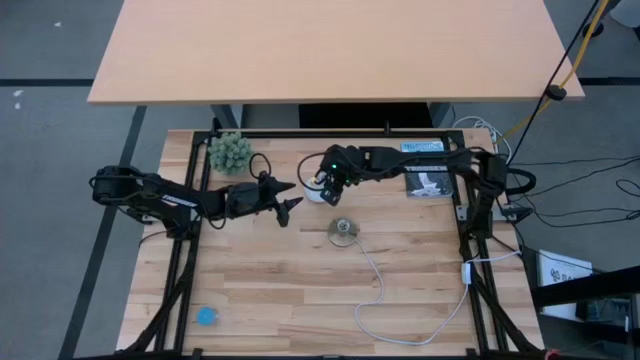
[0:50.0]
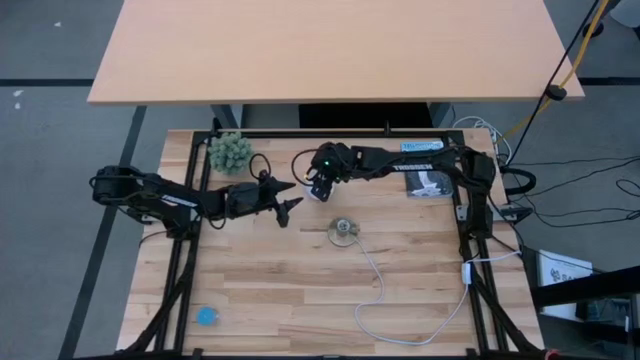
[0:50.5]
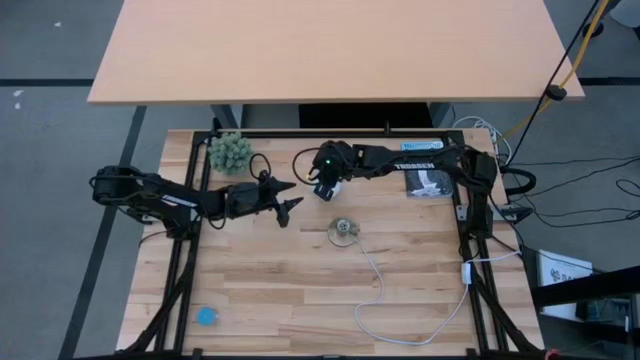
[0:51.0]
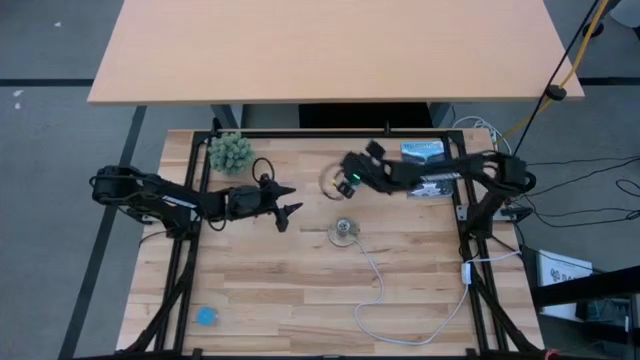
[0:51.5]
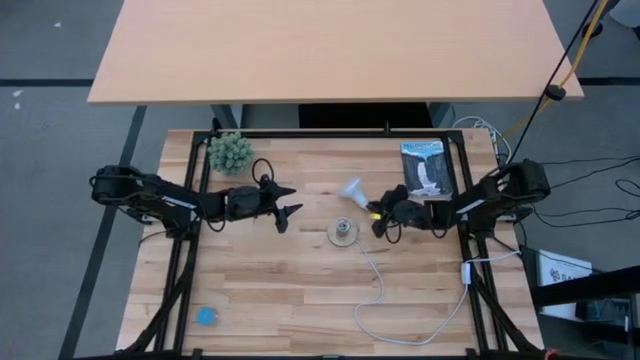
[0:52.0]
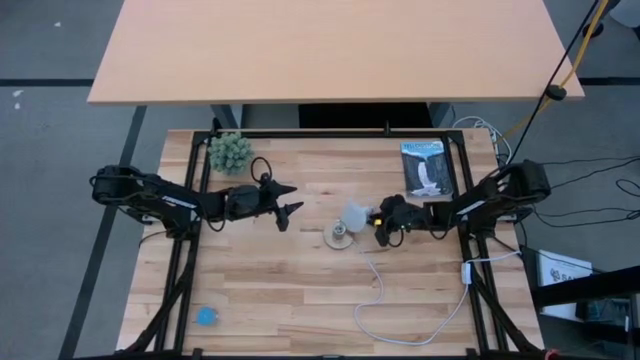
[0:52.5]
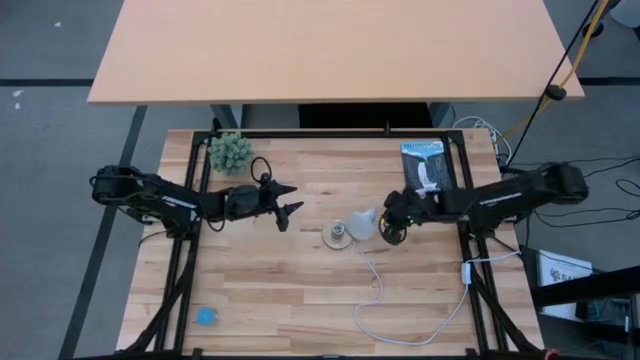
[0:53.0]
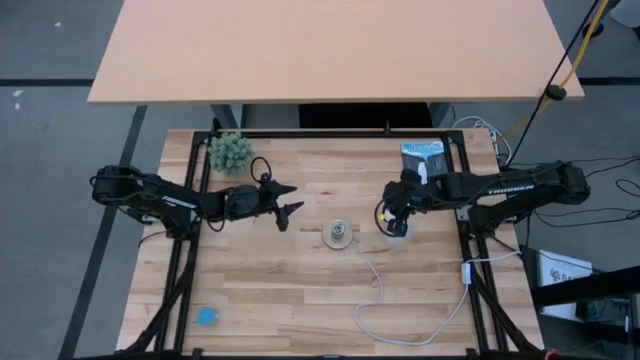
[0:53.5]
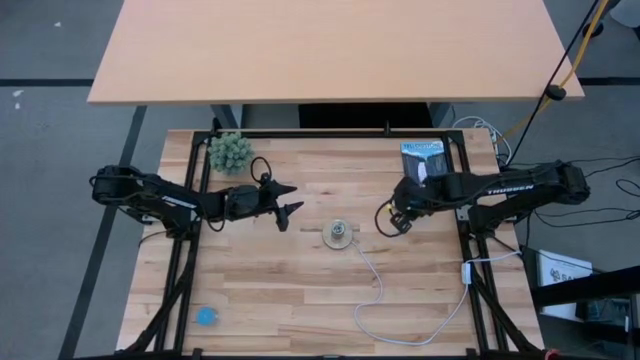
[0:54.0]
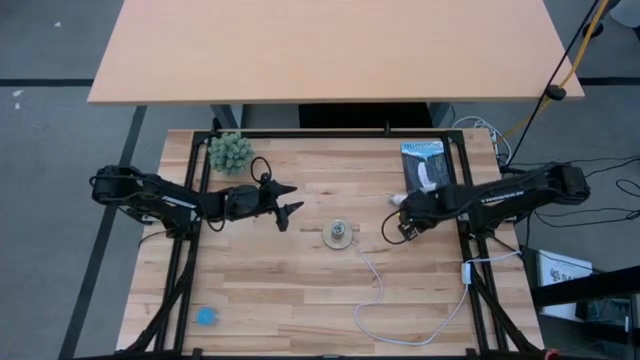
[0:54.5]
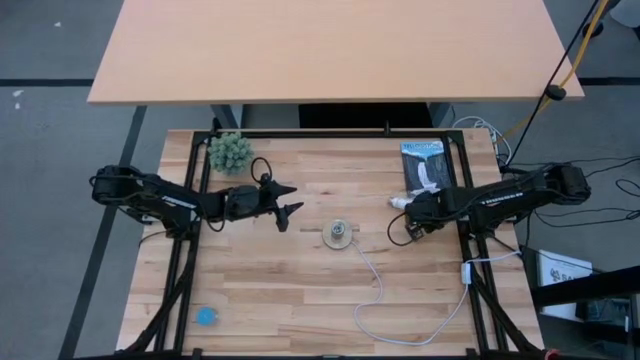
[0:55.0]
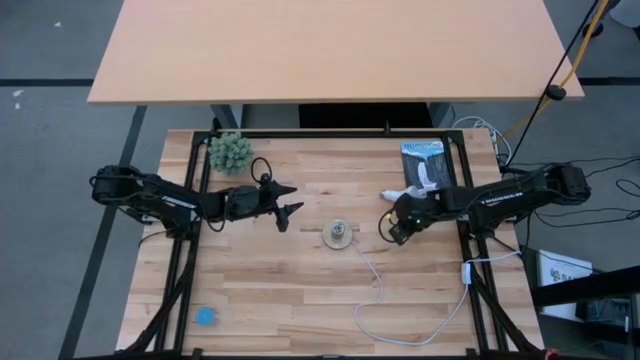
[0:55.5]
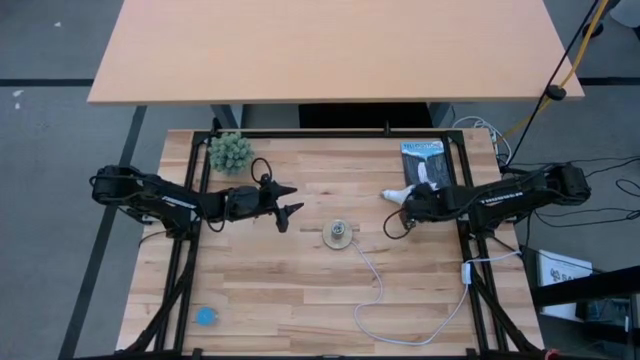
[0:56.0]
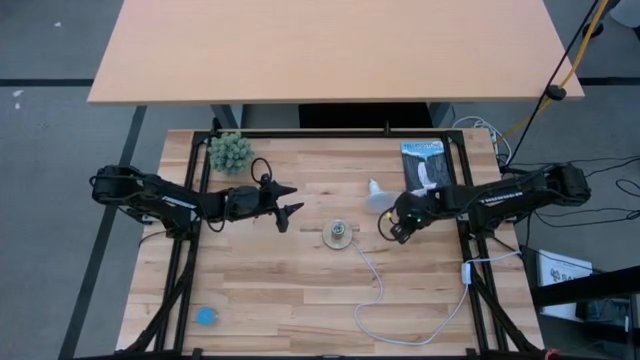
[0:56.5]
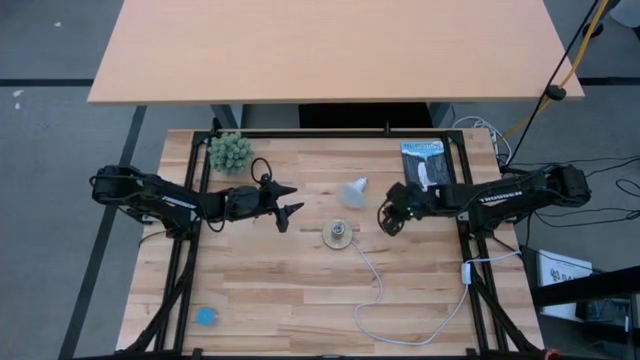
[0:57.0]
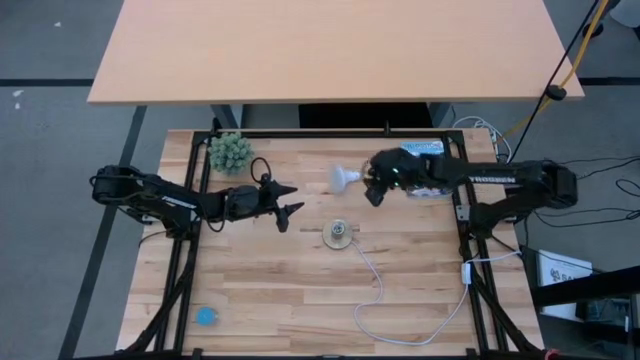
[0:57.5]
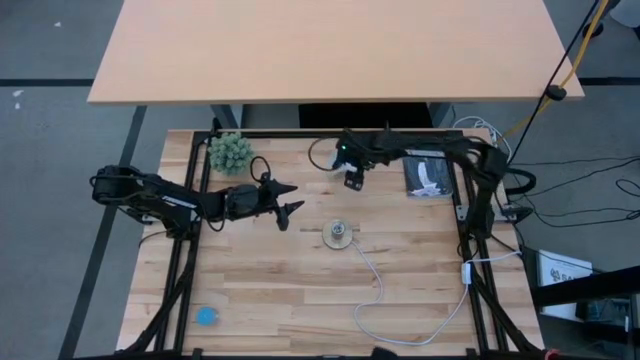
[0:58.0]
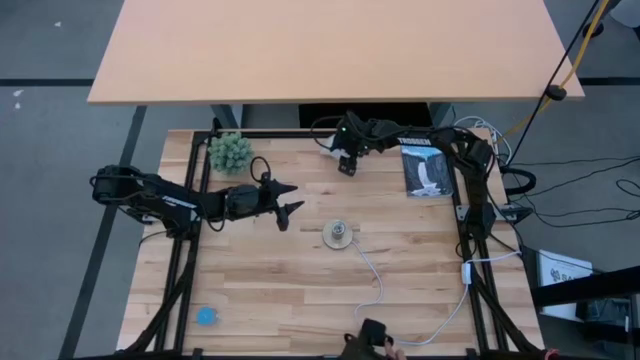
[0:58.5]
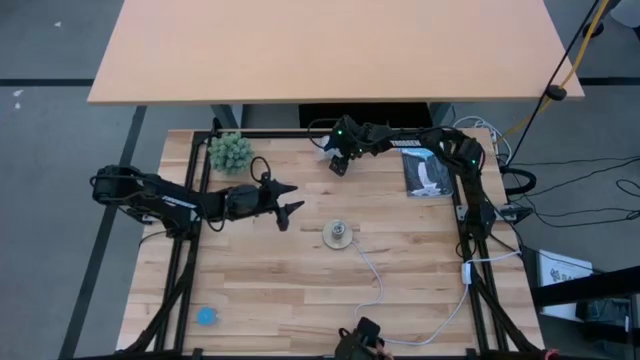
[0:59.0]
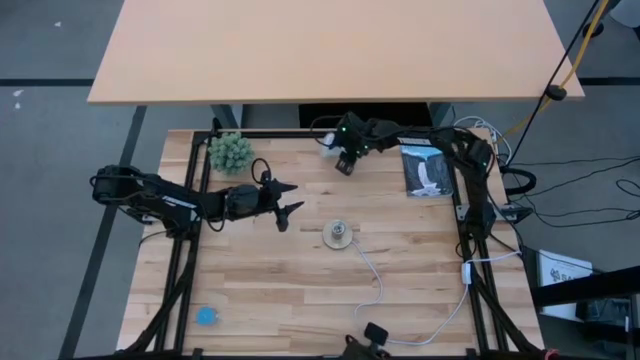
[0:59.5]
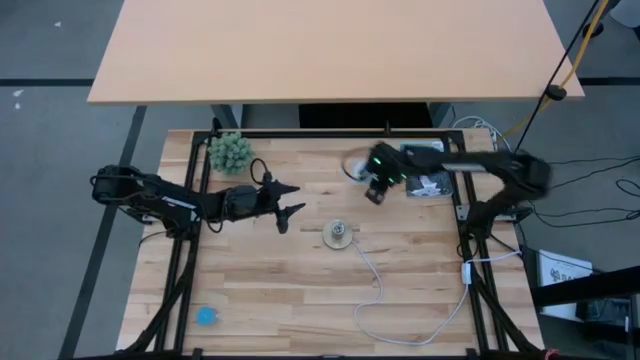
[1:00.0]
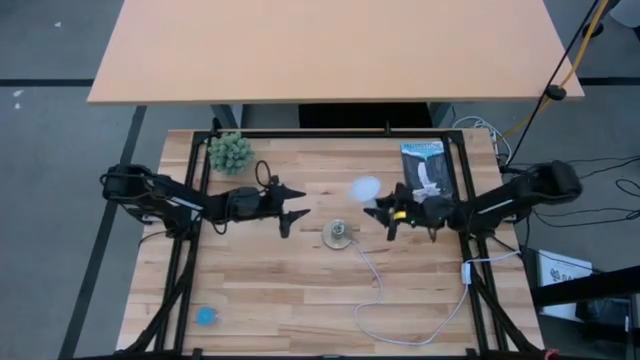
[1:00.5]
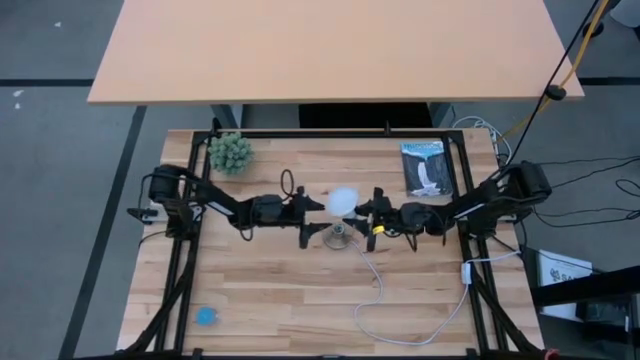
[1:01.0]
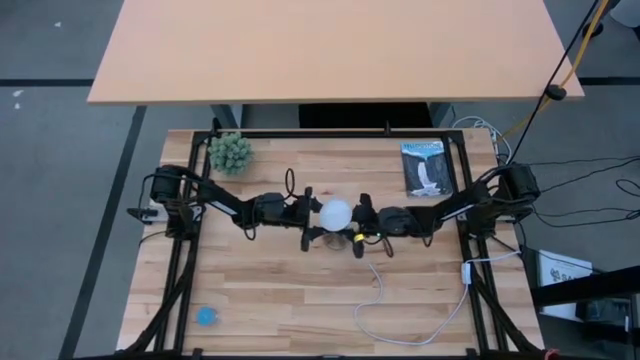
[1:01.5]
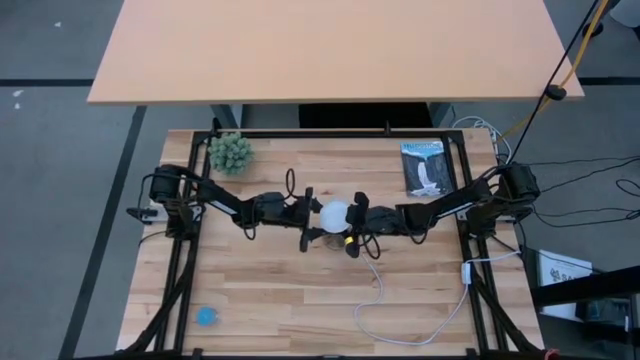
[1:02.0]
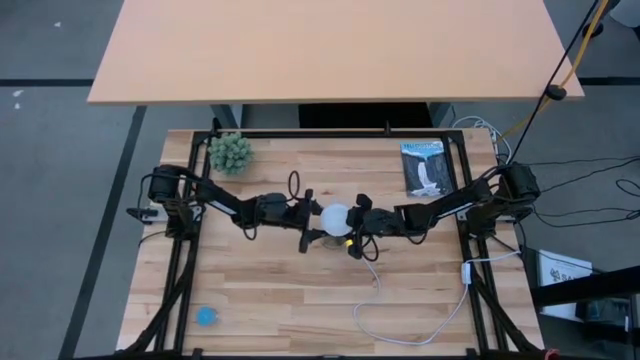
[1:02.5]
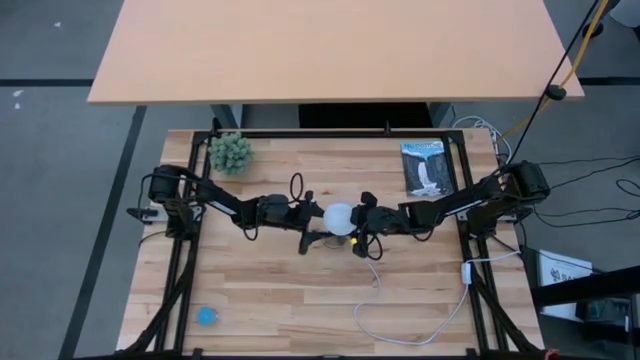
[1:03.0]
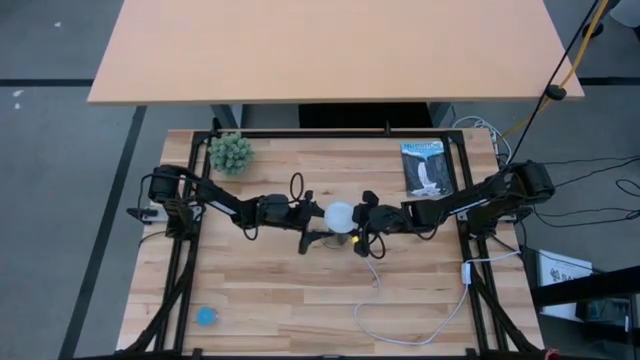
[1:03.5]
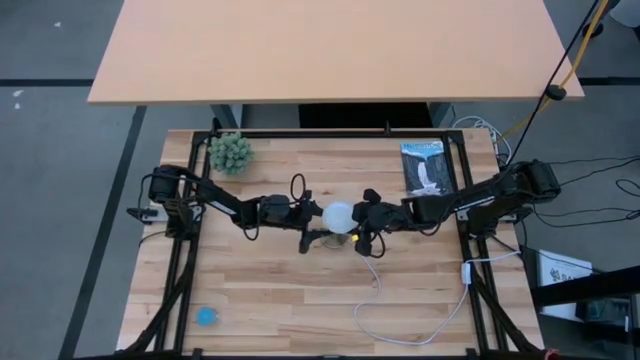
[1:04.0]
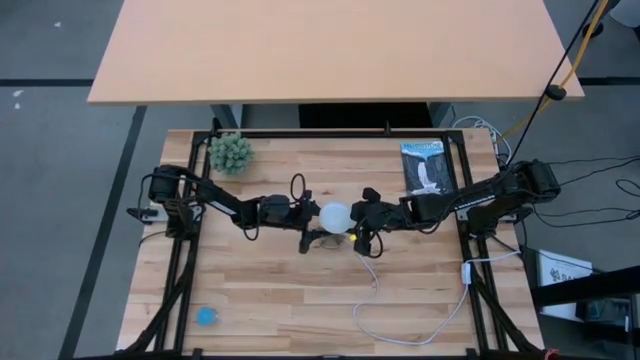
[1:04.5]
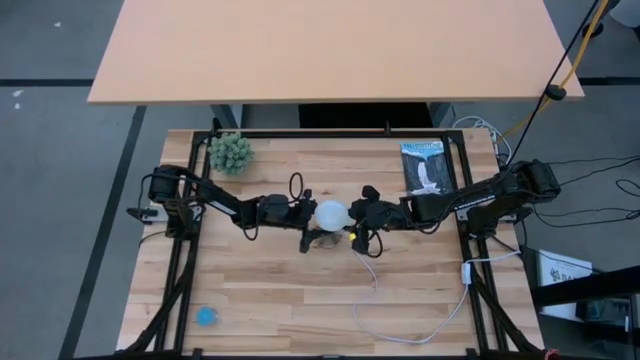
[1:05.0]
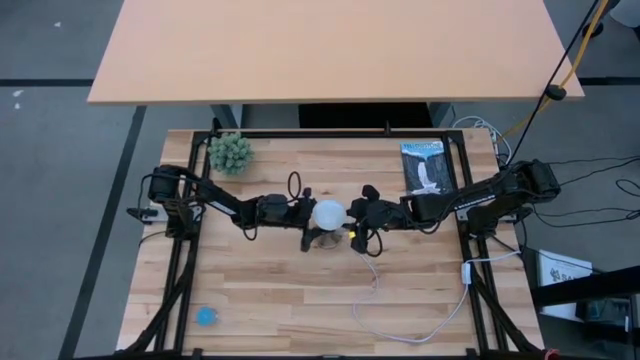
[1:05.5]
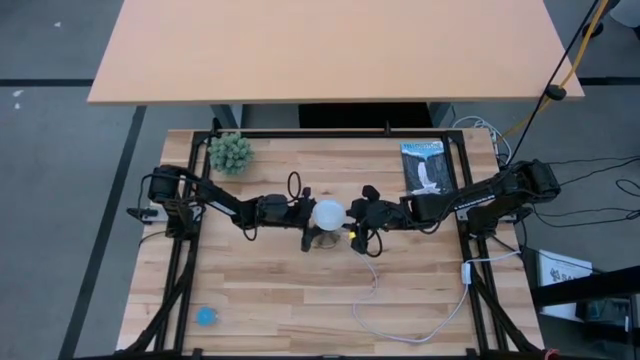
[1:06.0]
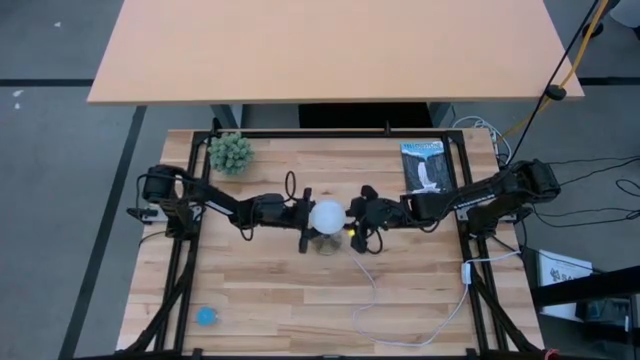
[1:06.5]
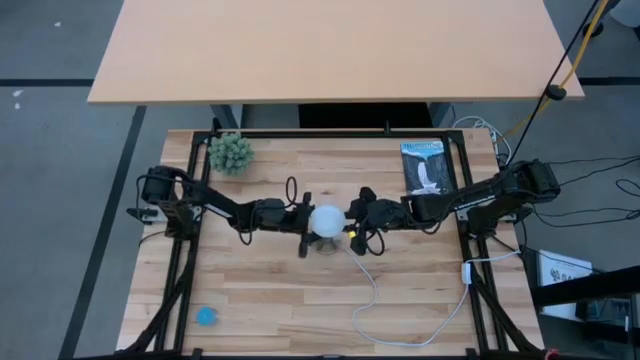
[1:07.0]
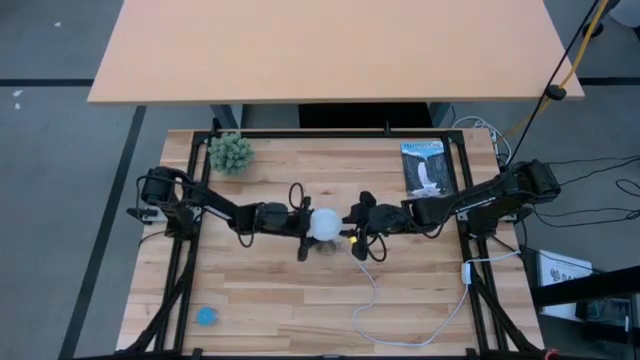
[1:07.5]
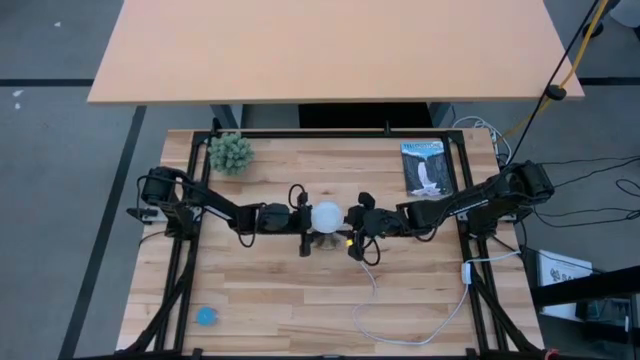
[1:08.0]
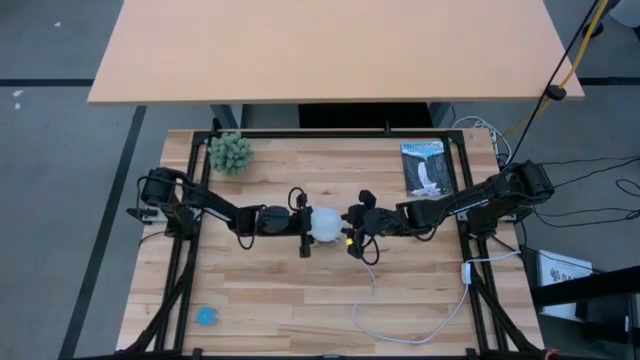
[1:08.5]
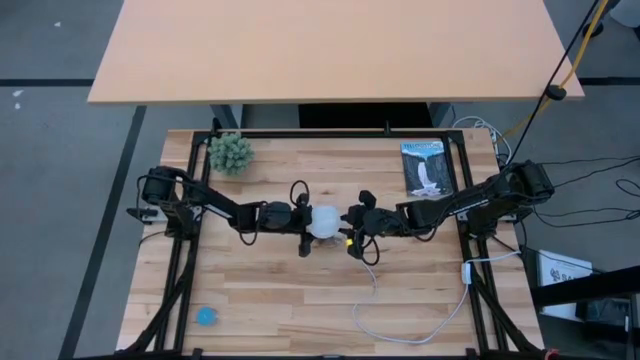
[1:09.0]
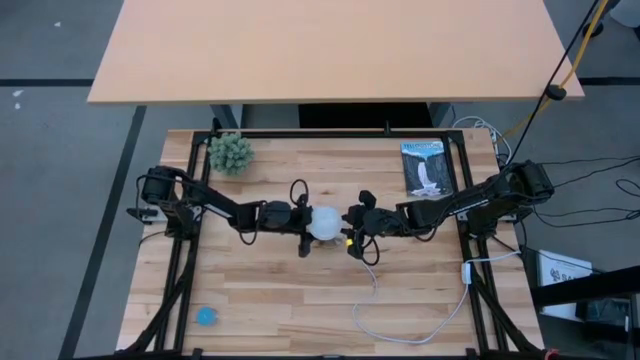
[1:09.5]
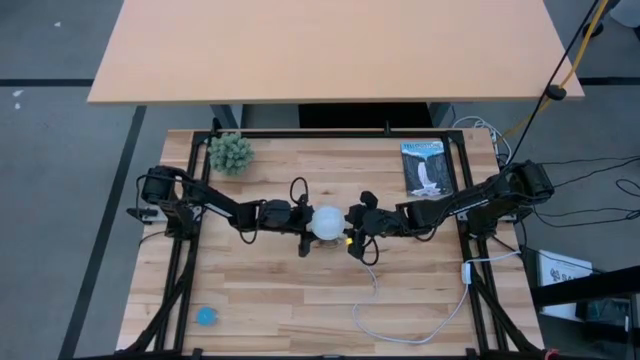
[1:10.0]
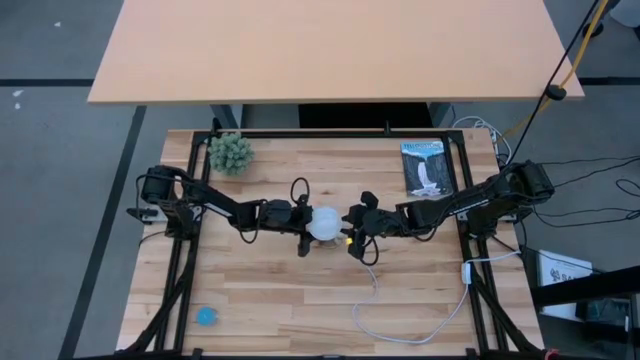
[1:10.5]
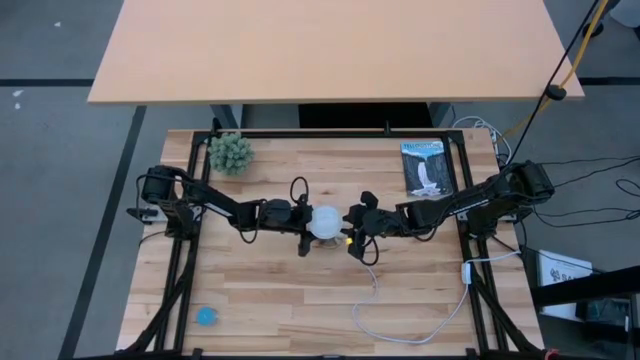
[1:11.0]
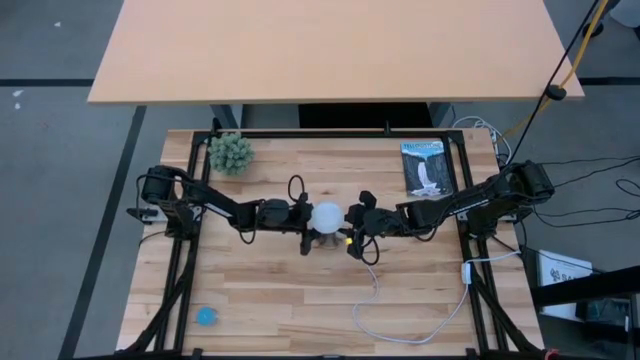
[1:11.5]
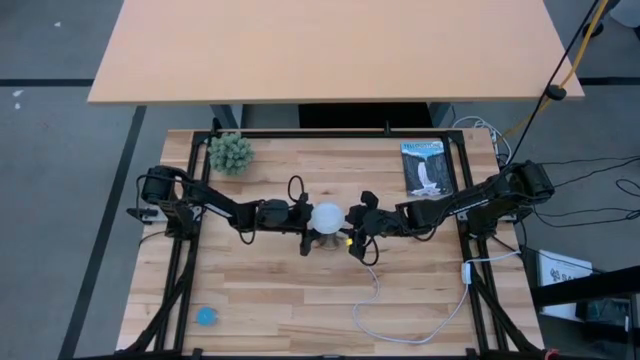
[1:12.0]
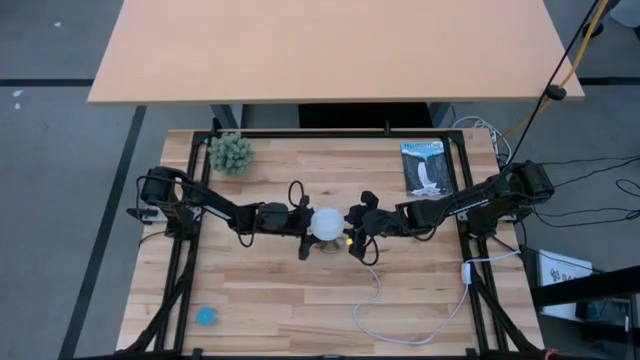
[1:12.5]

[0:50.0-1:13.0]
Task: Screw lightbulb
Insert the white light bulb into the gold lamp
